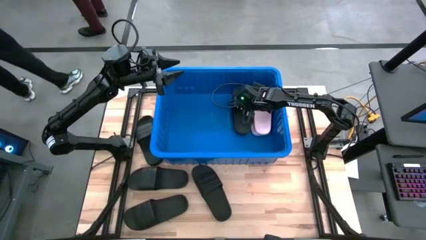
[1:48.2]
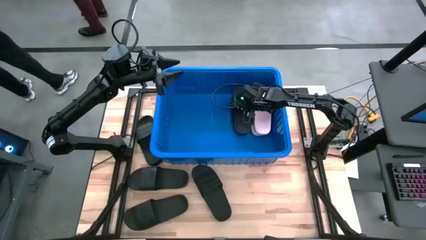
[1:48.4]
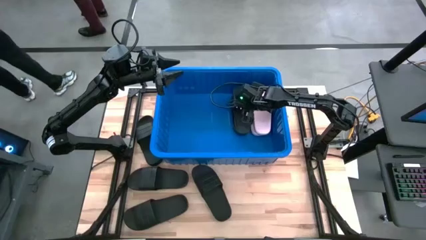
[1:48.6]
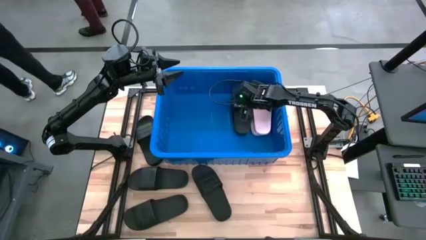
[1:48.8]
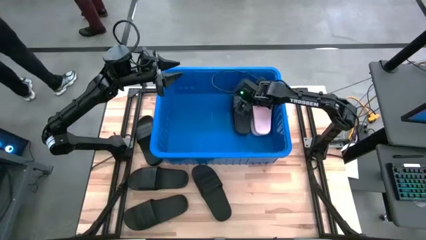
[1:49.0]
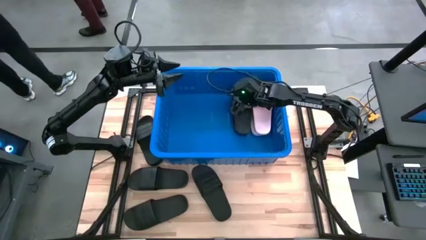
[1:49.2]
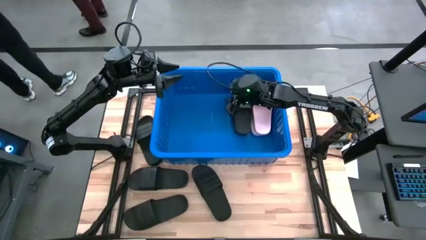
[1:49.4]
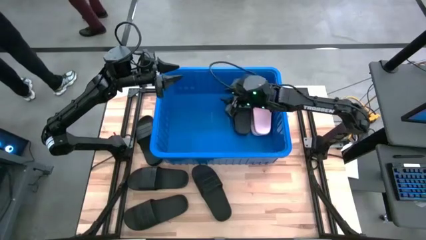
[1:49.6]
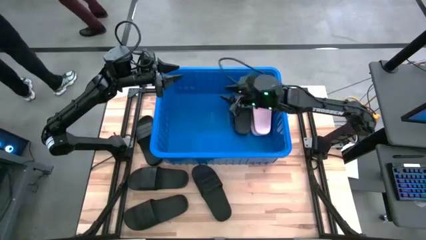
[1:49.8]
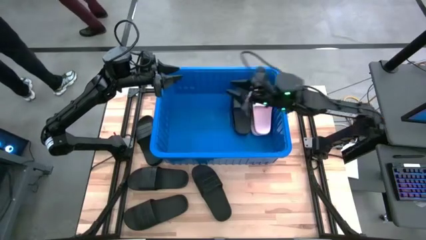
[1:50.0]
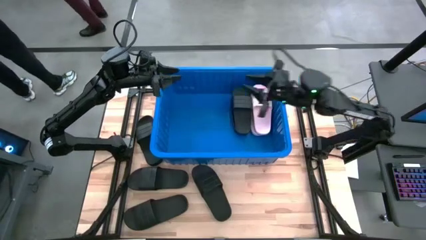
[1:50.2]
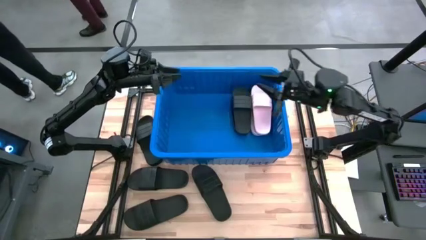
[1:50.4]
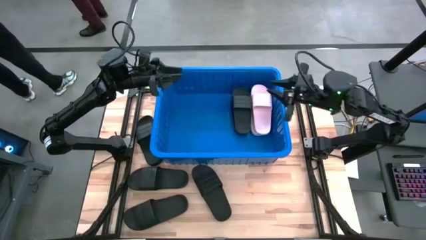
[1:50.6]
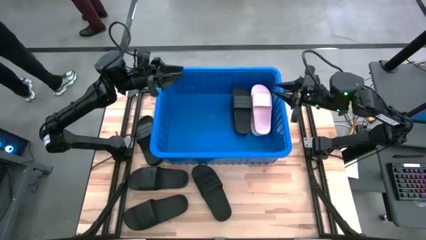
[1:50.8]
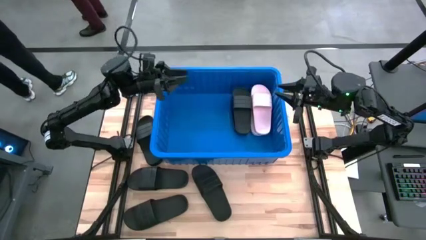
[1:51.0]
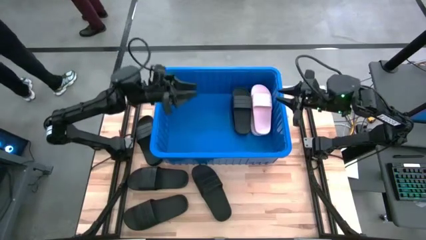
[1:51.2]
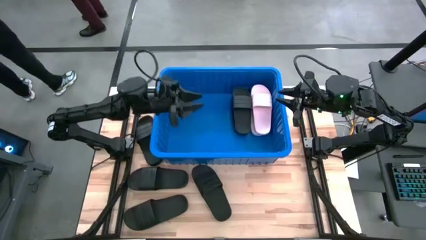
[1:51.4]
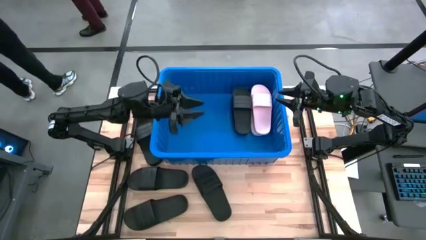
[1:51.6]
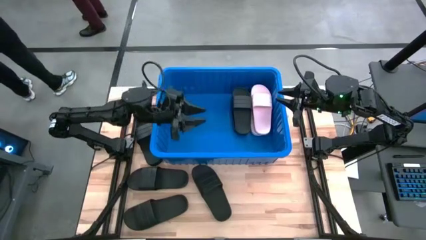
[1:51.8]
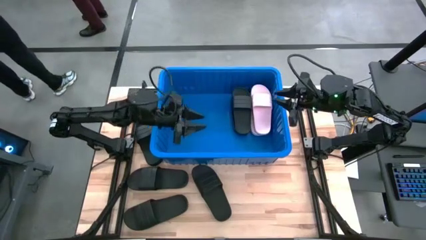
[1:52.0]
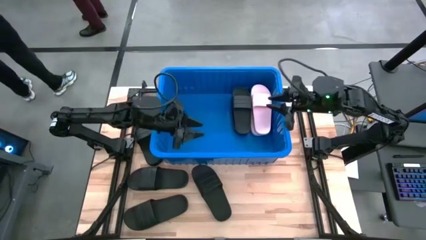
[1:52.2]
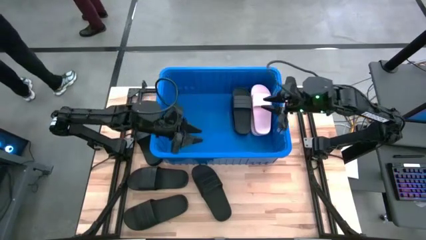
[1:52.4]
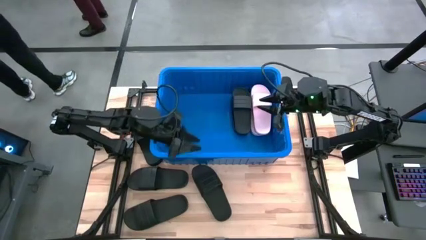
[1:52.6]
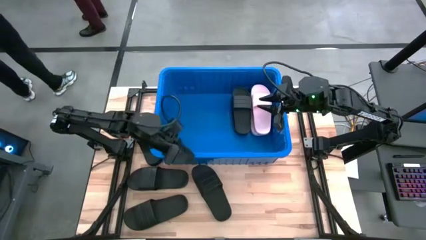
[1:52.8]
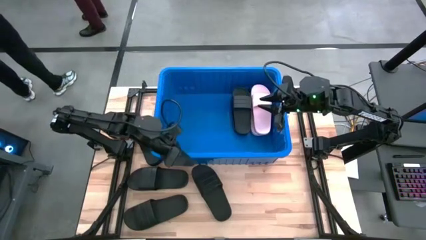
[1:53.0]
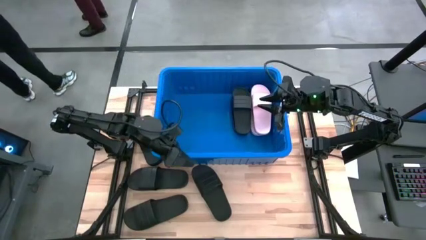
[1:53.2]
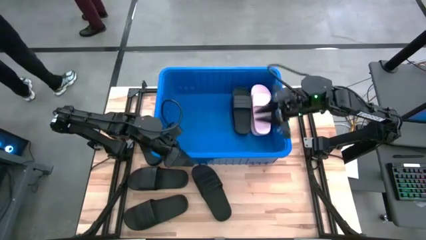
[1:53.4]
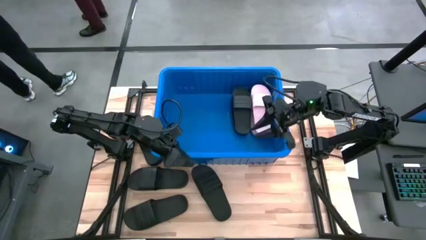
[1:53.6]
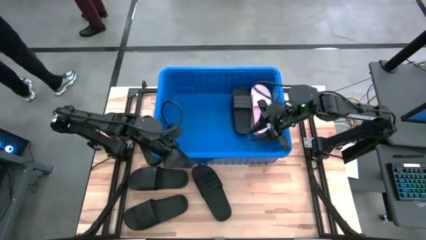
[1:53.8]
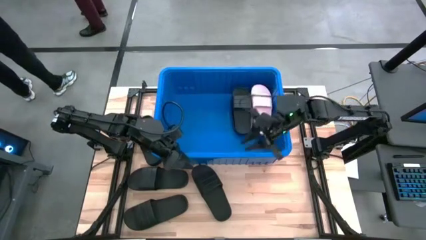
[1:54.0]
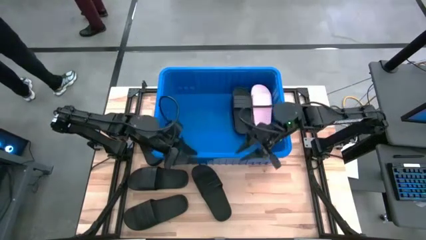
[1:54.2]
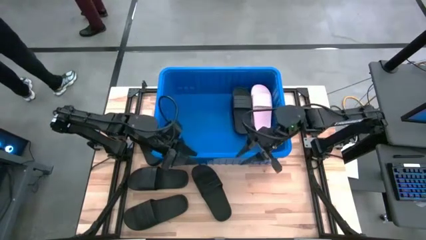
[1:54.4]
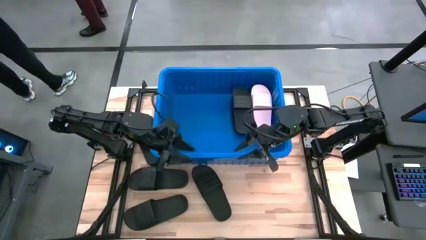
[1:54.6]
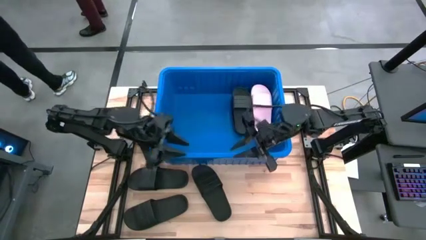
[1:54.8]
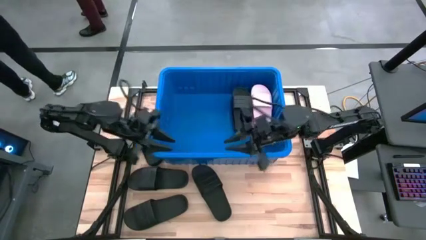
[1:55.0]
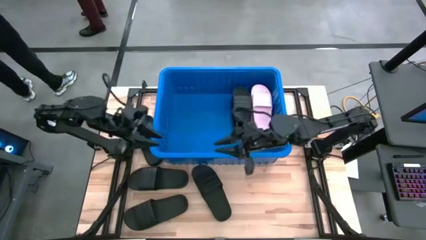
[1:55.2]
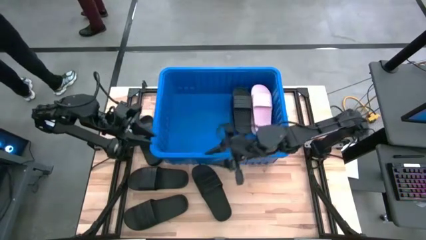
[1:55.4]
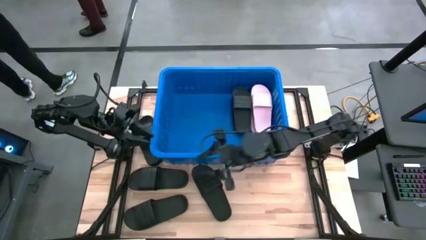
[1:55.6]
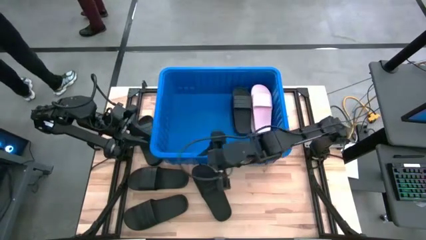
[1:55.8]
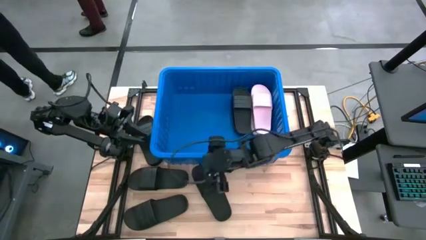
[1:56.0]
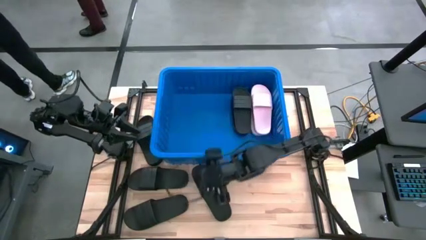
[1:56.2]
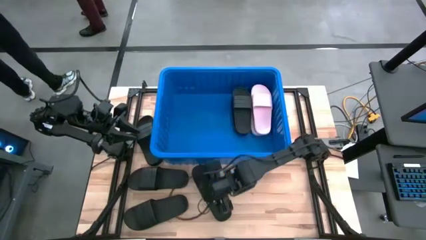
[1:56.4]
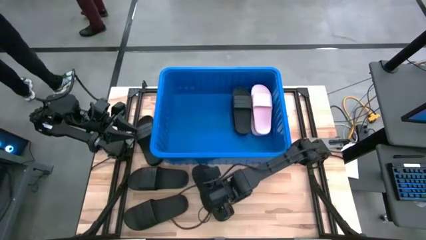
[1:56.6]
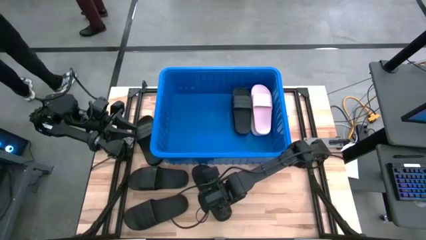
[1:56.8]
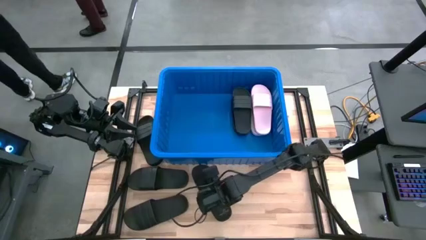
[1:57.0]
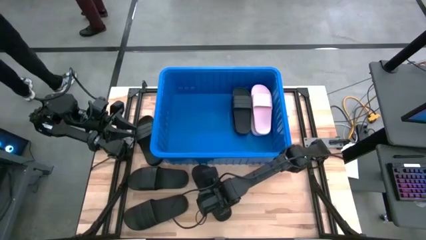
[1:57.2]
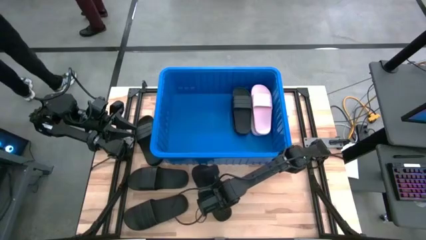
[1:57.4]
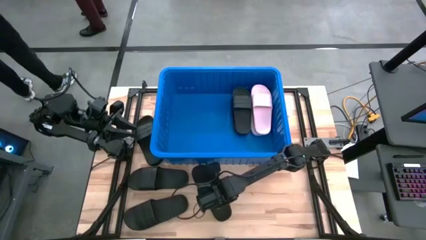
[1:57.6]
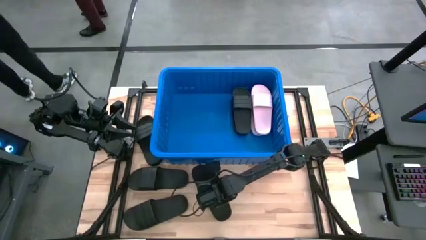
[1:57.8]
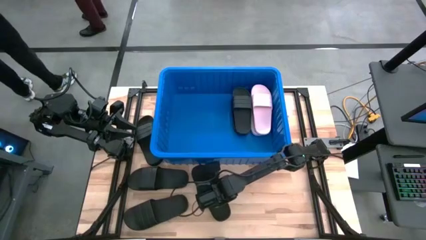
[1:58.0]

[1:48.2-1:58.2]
Task: Pick and place slides into bin
Put the black slide into the blue bin
